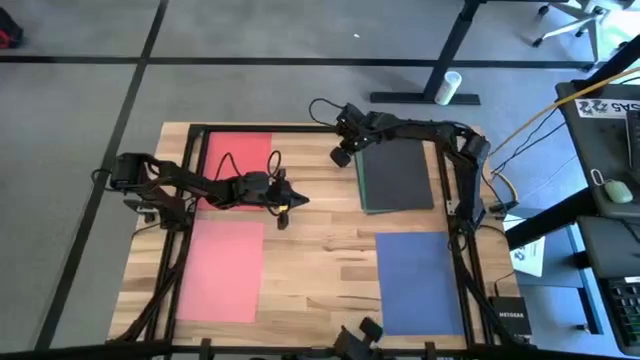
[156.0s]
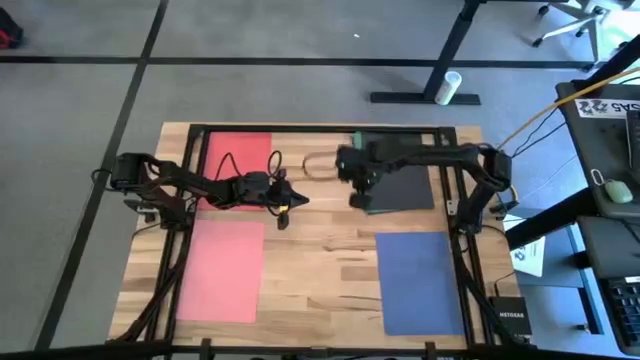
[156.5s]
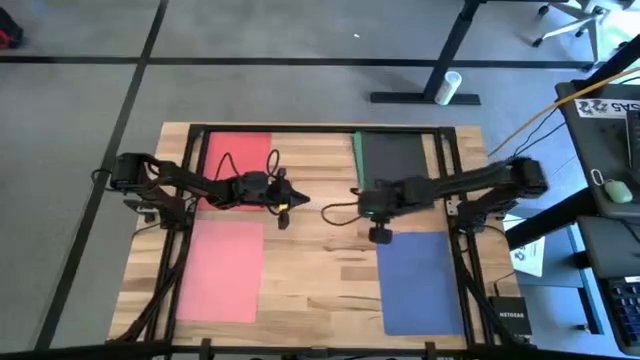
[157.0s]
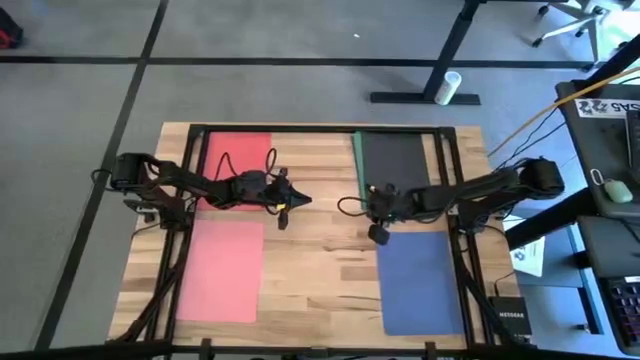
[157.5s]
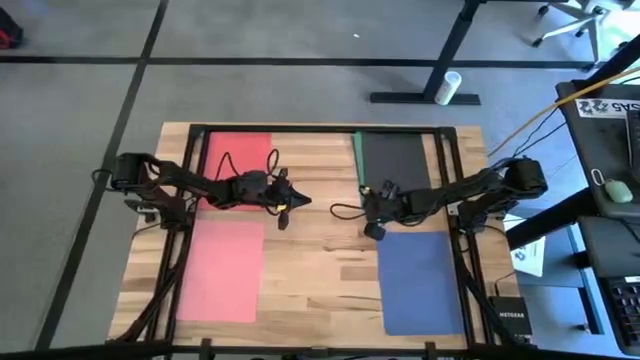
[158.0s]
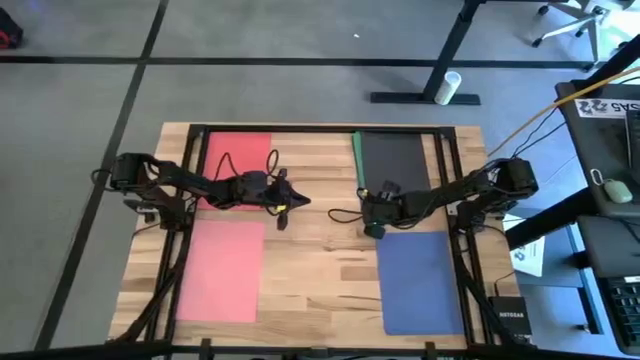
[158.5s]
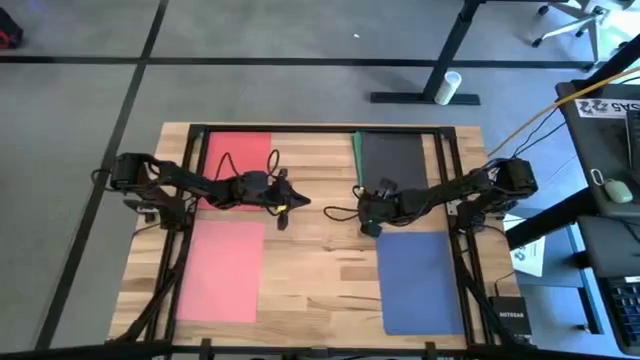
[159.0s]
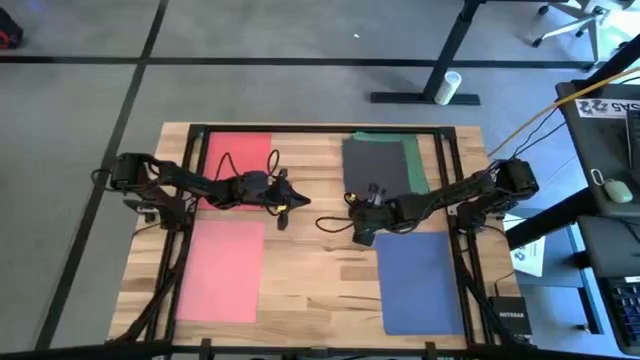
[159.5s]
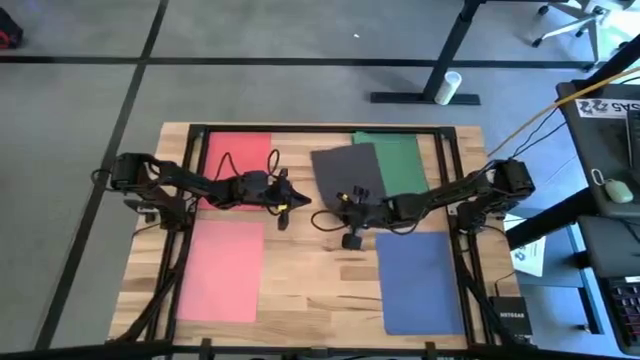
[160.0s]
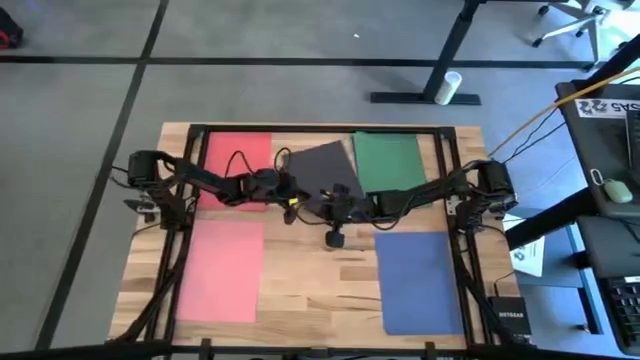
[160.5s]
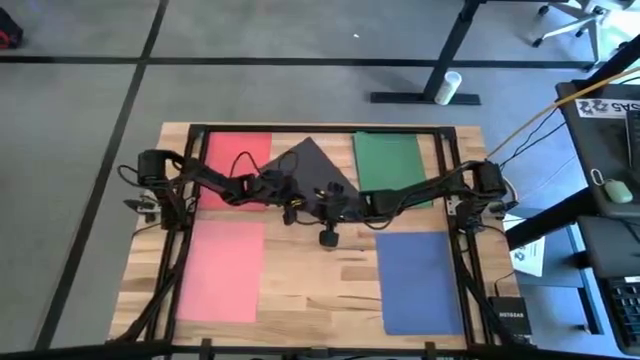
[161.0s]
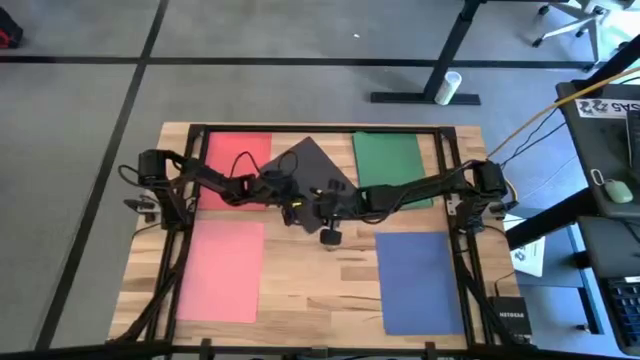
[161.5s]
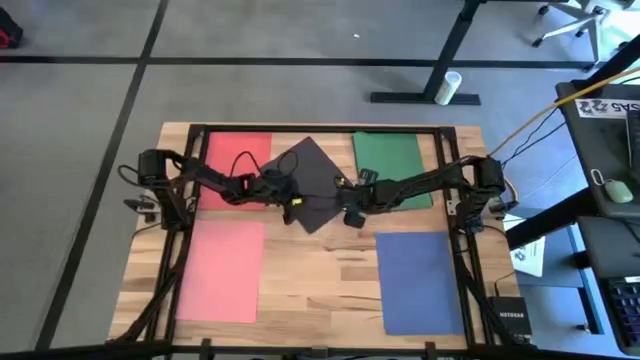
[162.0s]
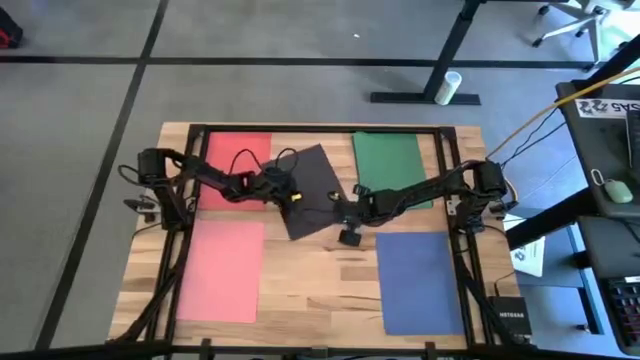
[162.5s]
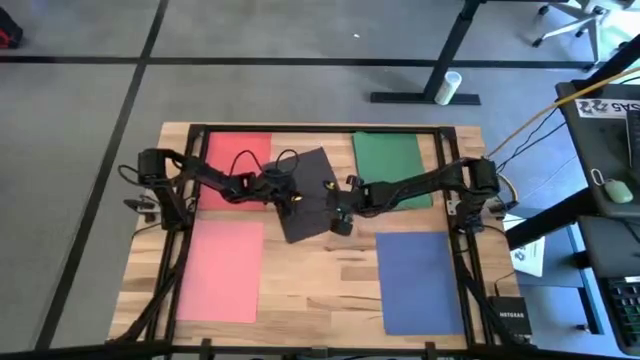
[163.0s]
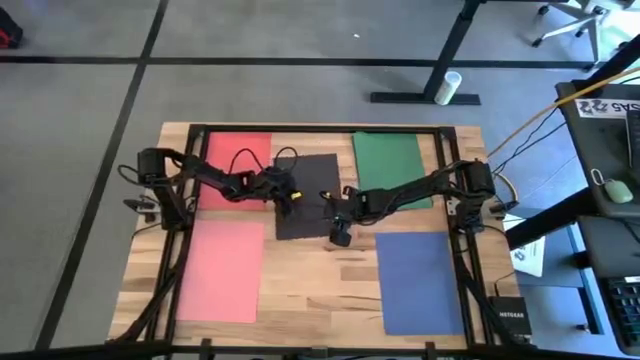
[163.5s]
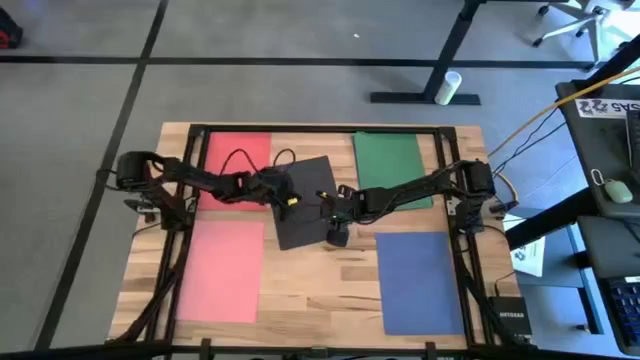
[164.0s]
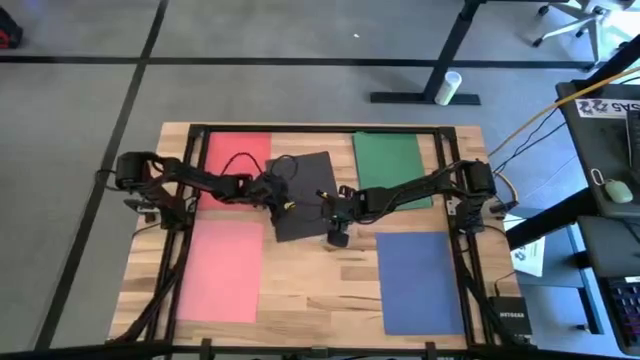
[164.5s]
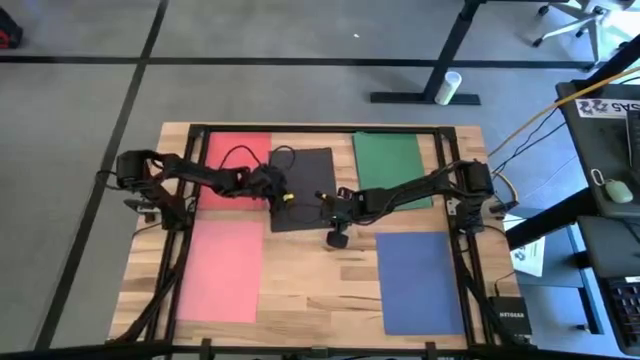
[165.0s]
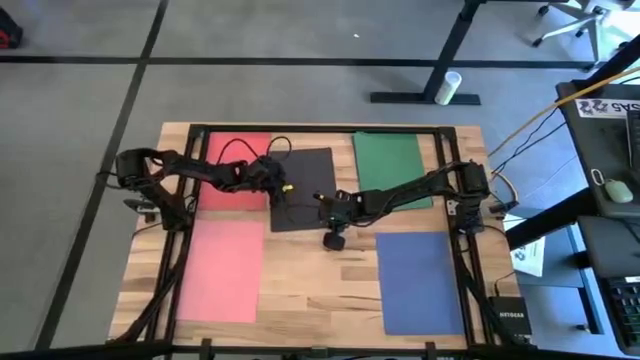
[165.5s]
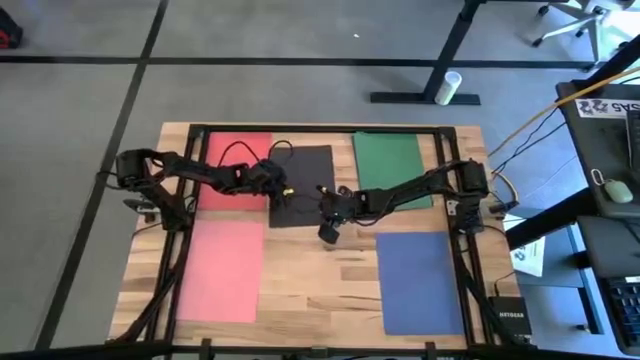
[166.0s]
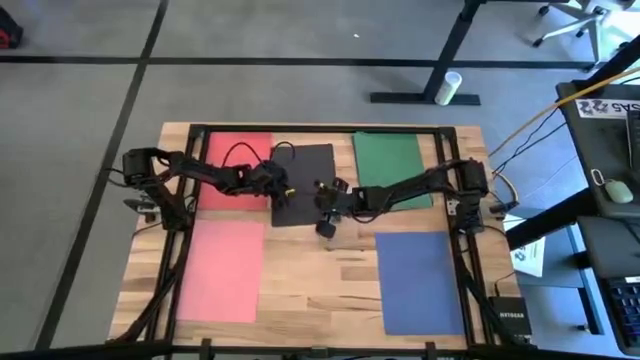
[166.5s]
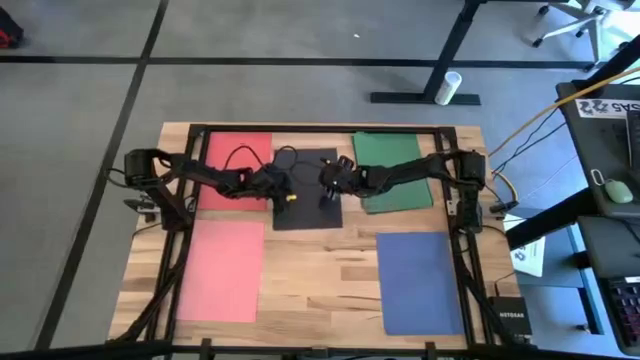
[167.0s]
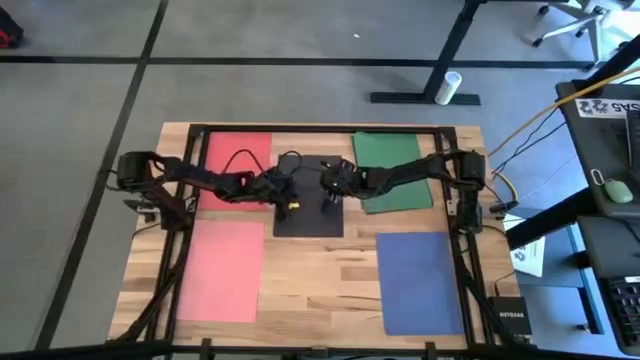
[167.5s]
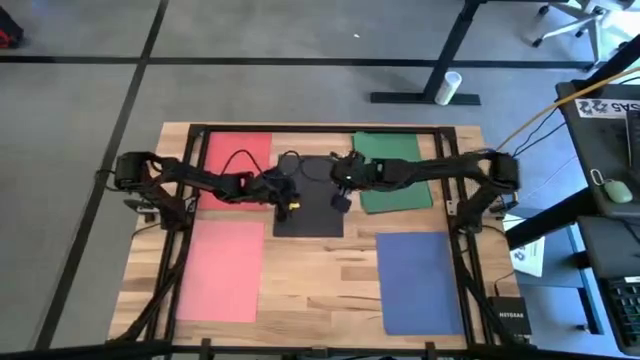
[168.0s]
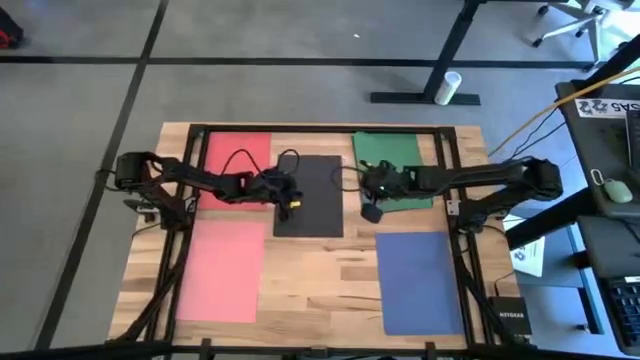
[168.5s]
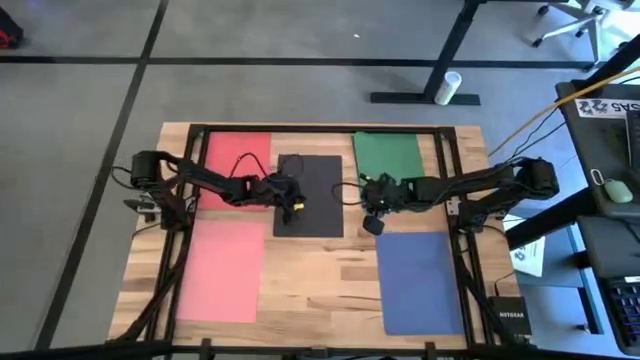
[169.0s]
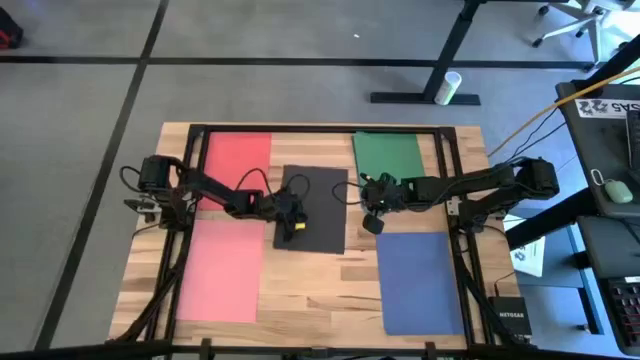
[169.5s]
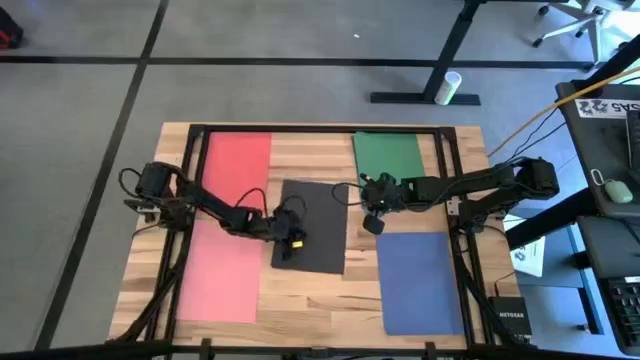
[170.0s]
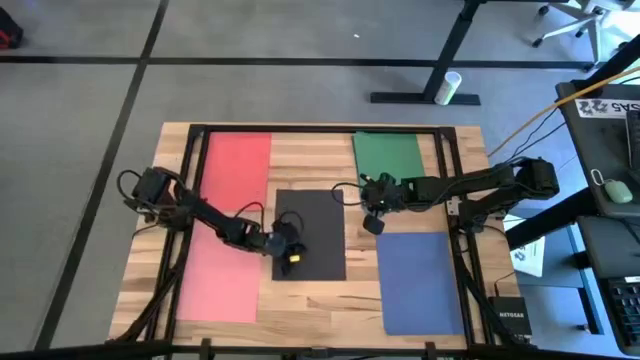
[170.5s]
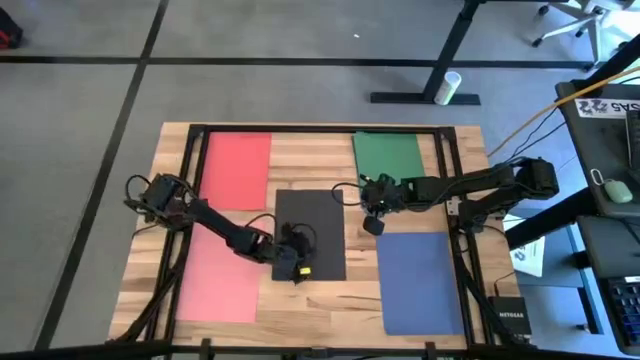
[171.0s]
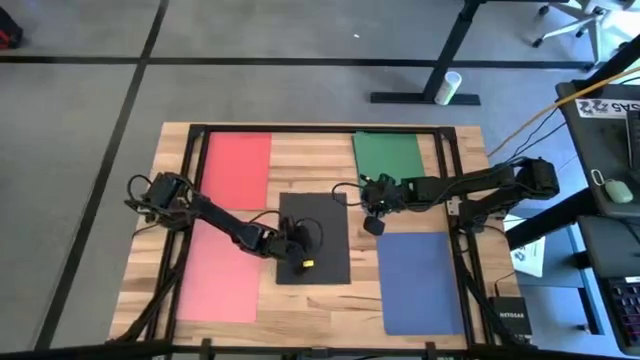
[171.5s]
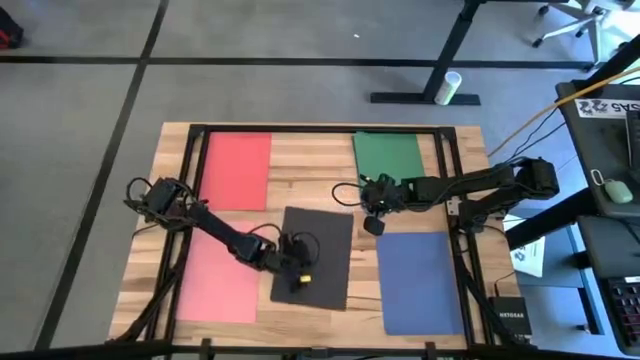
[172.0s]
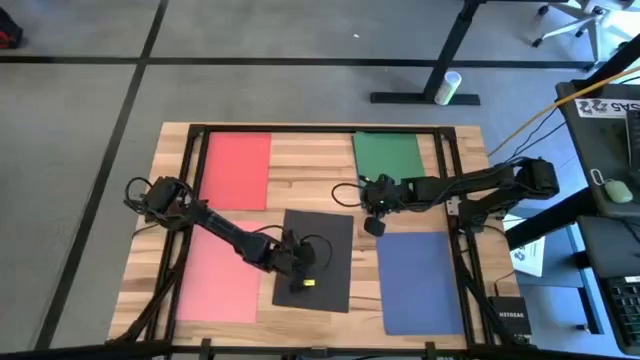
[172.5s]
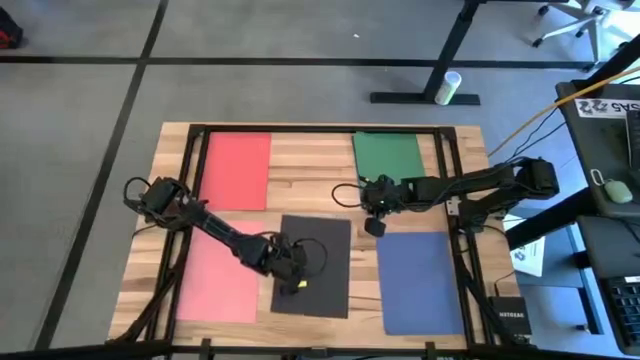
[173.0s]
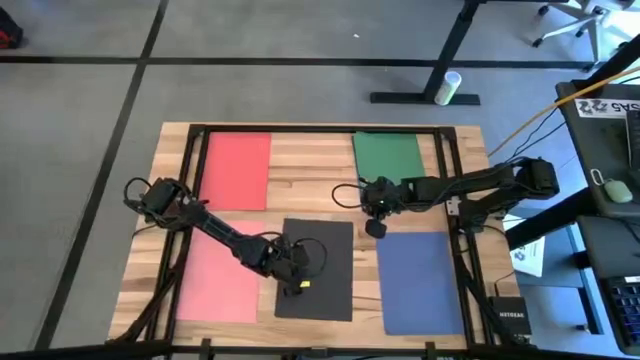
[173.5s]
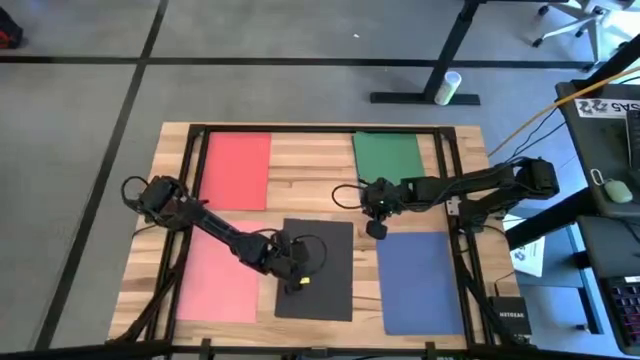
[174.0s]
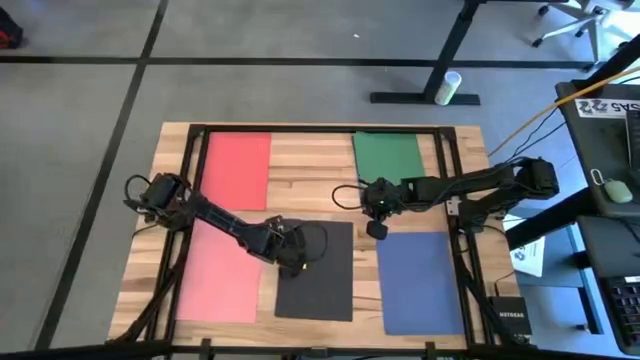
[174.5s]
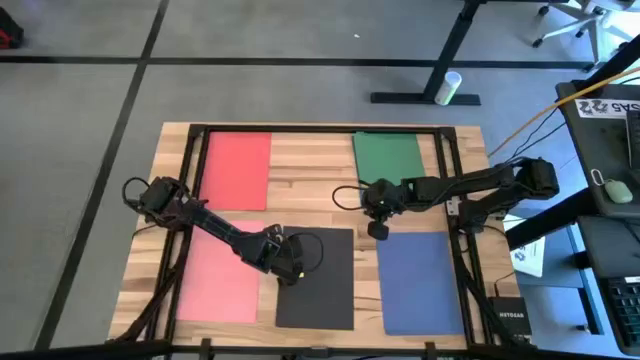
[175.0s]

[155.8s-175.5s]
Task: Organize paper
Put the black paper on the bottom center of the table

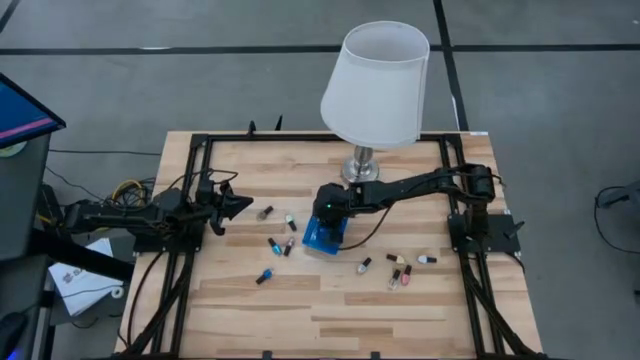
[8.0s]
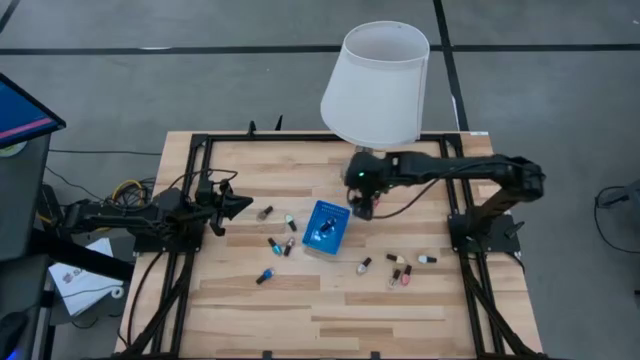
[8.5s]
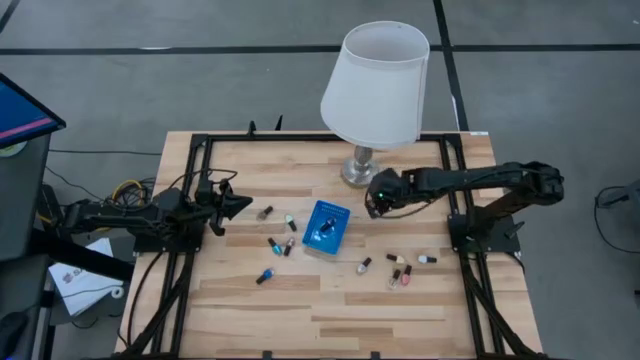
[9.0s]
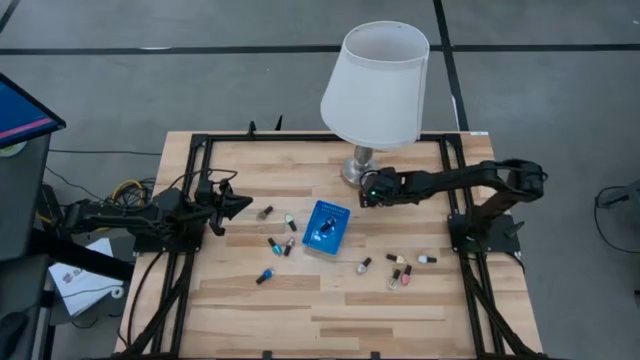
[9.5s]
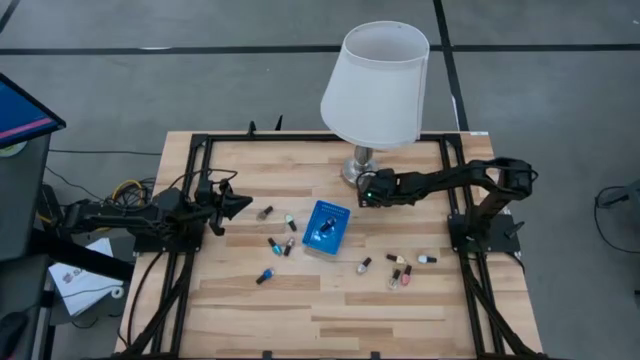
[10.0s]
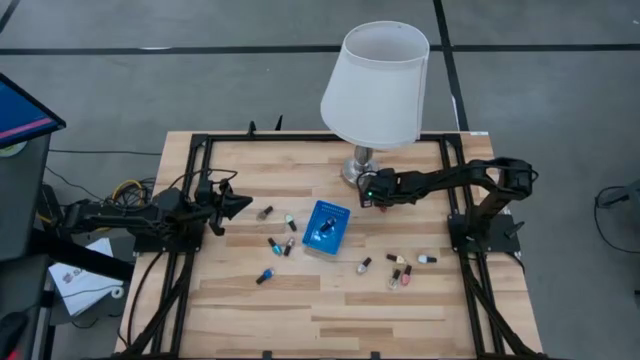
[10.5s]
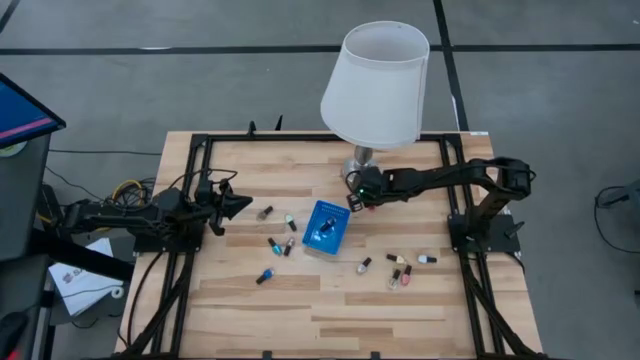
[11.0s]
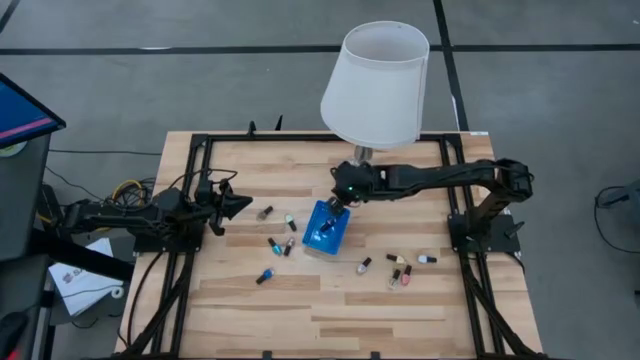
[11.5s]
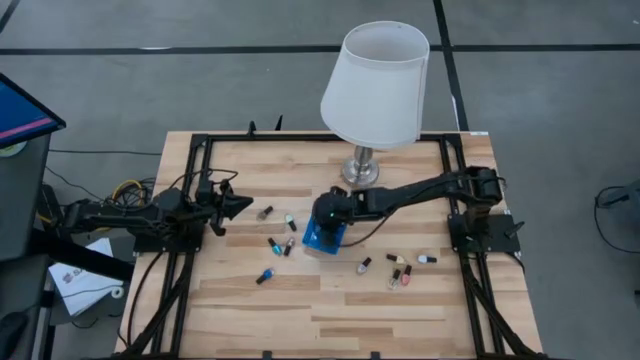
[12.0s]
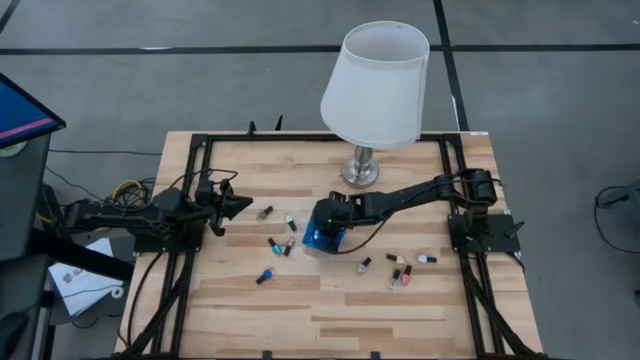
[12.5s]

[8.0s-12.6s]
Task: Pick & Place Nail Polish
Put the top right pink nail polish into the blue basket
